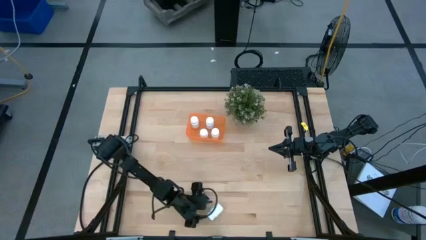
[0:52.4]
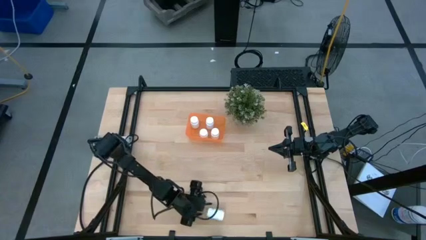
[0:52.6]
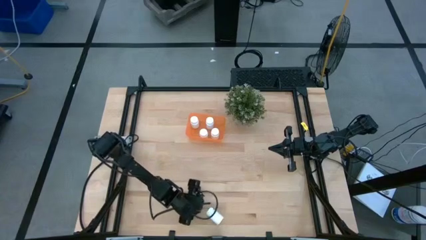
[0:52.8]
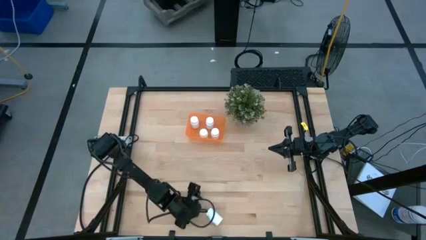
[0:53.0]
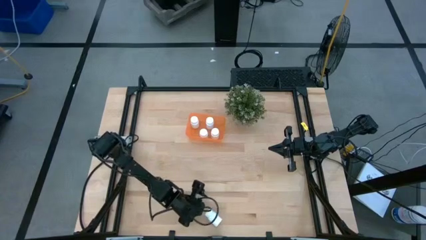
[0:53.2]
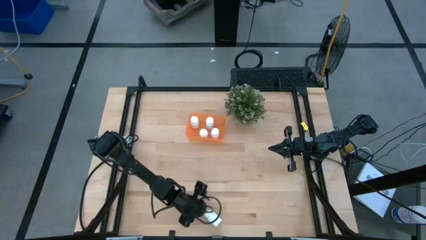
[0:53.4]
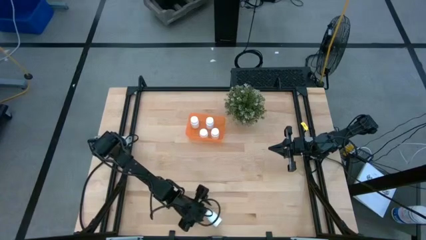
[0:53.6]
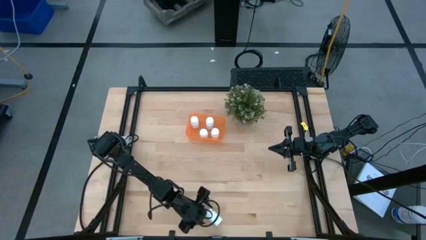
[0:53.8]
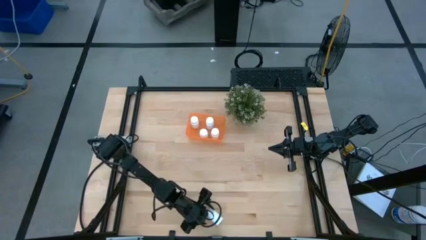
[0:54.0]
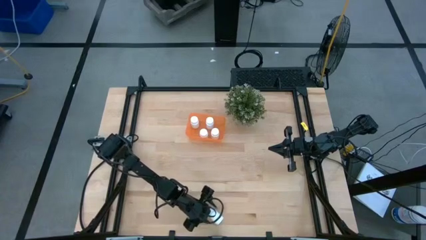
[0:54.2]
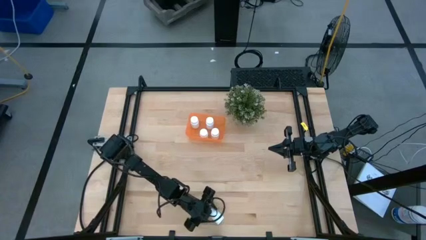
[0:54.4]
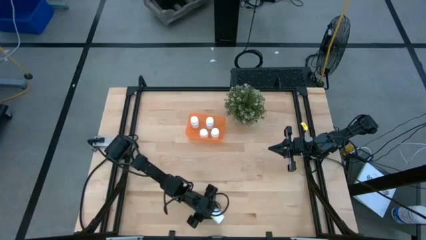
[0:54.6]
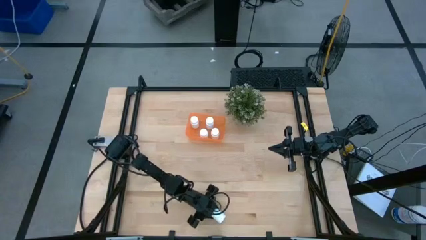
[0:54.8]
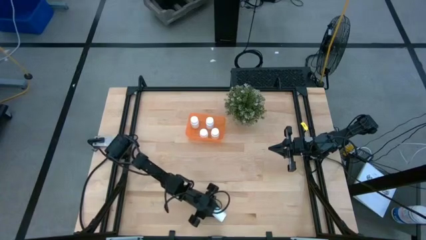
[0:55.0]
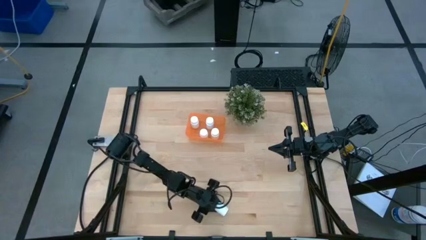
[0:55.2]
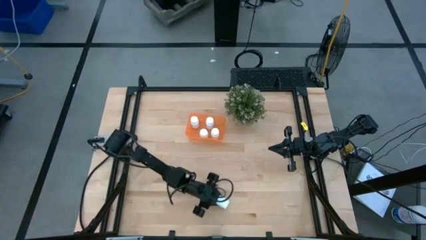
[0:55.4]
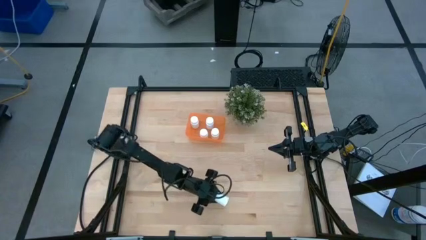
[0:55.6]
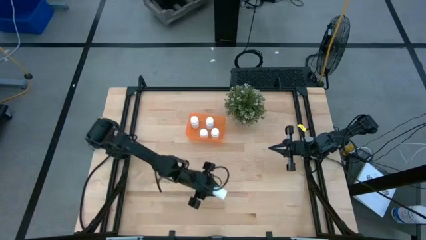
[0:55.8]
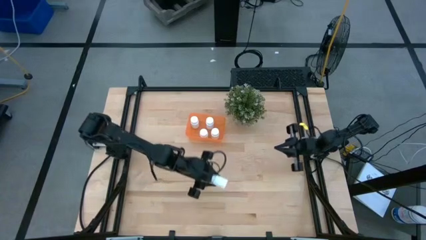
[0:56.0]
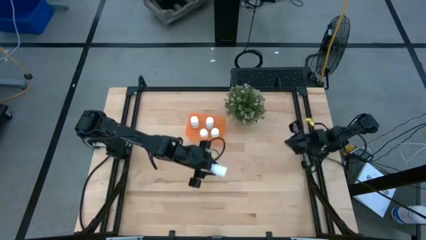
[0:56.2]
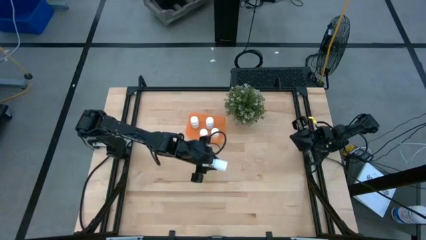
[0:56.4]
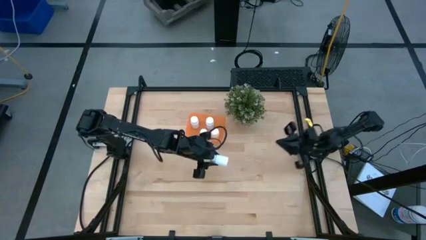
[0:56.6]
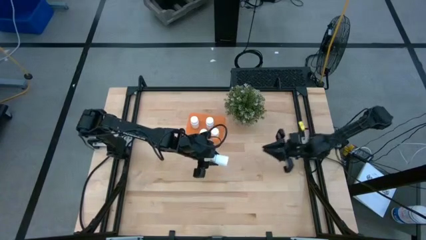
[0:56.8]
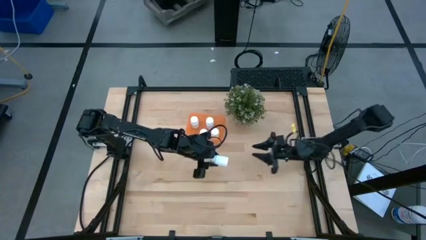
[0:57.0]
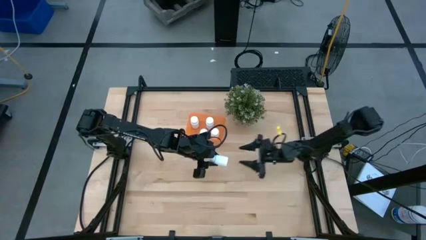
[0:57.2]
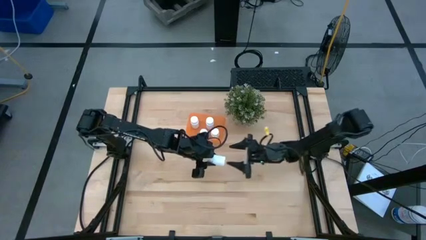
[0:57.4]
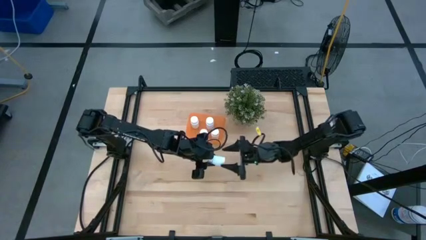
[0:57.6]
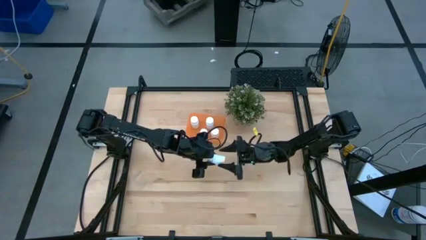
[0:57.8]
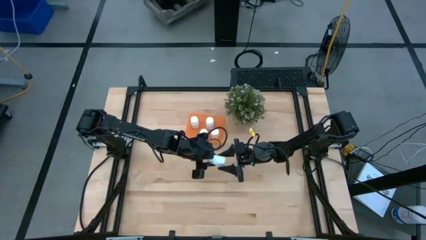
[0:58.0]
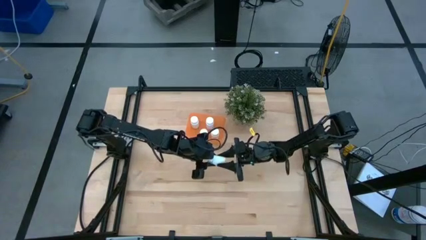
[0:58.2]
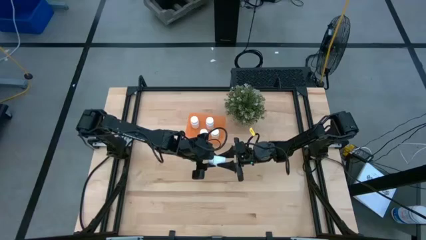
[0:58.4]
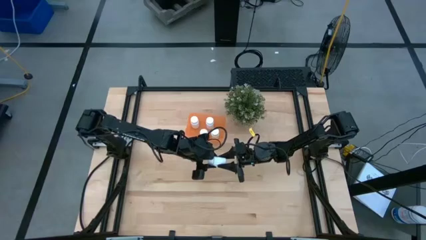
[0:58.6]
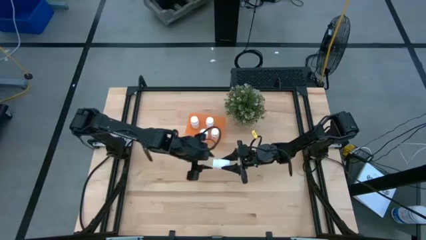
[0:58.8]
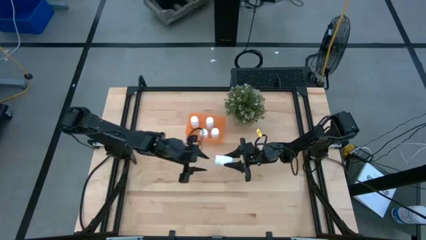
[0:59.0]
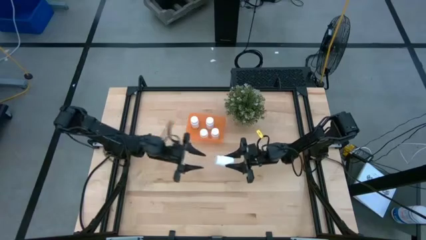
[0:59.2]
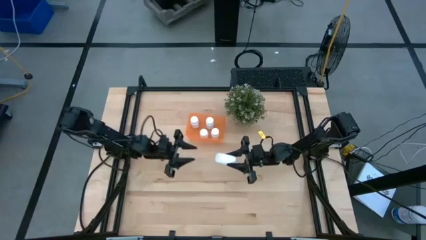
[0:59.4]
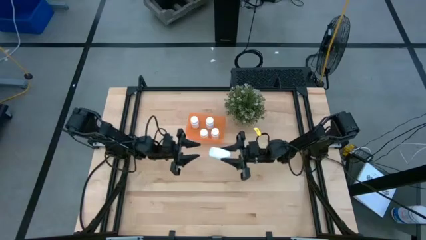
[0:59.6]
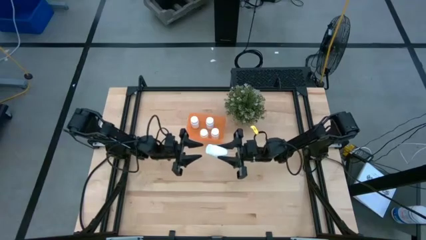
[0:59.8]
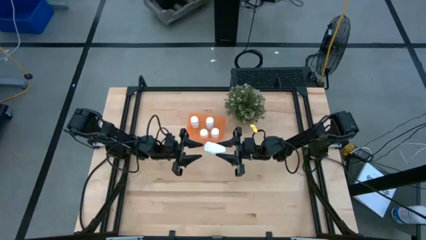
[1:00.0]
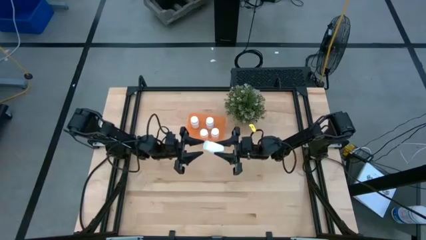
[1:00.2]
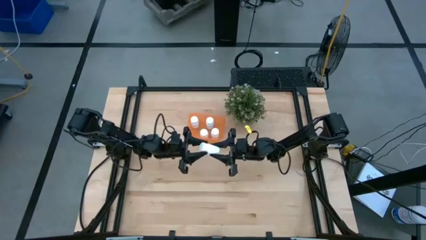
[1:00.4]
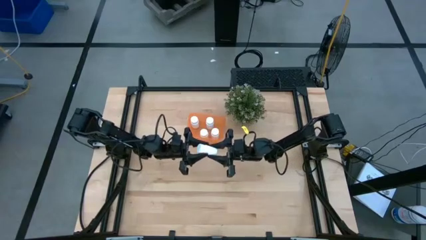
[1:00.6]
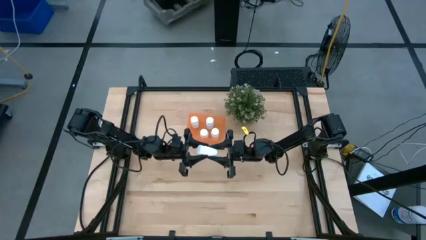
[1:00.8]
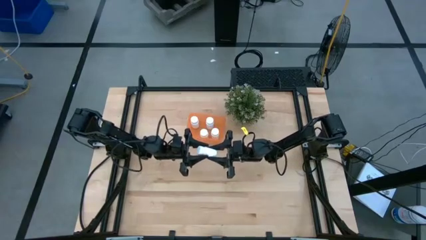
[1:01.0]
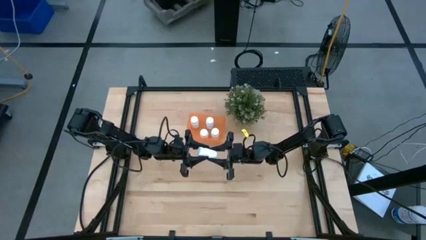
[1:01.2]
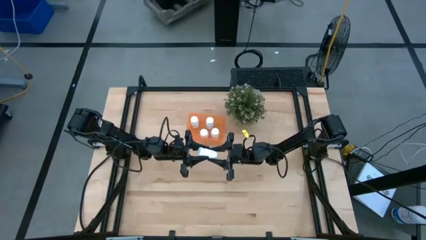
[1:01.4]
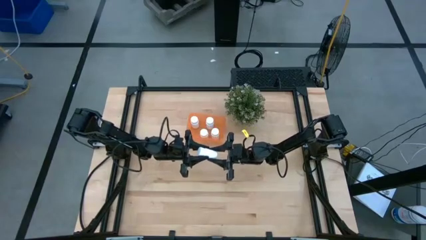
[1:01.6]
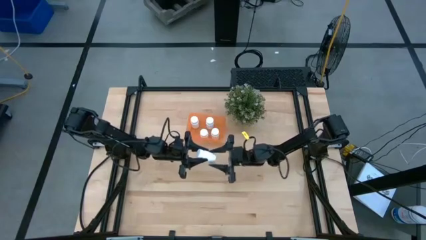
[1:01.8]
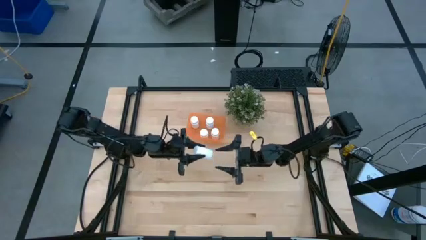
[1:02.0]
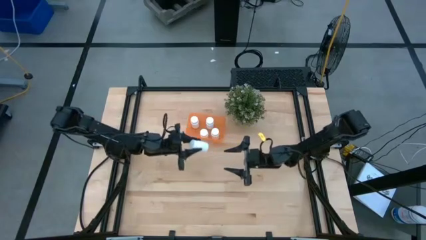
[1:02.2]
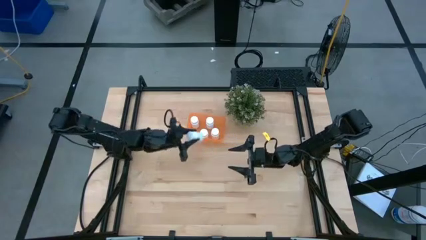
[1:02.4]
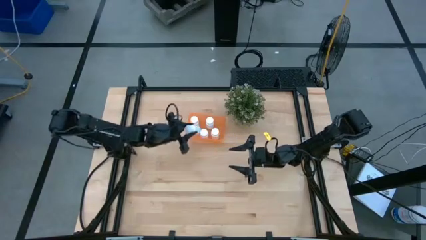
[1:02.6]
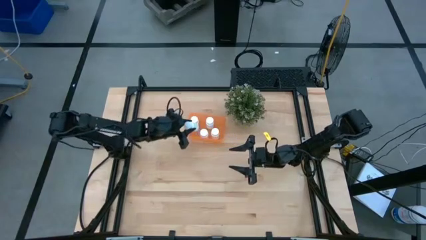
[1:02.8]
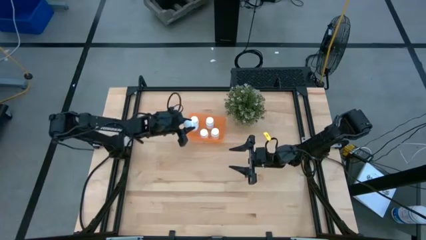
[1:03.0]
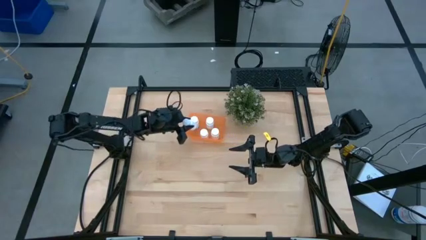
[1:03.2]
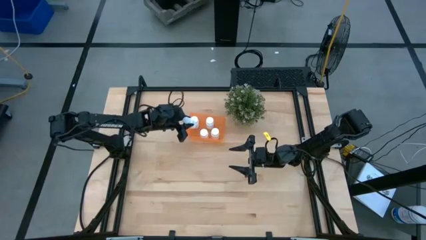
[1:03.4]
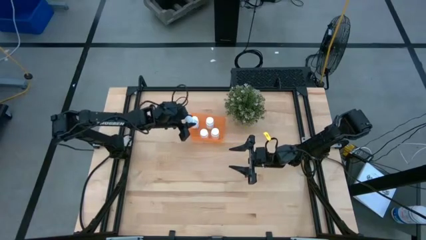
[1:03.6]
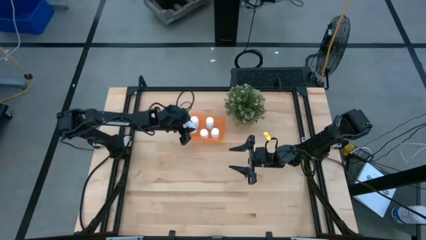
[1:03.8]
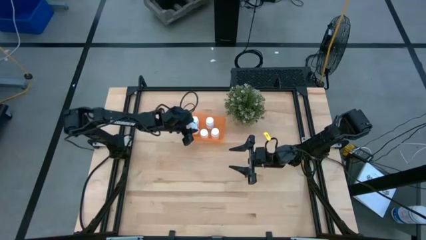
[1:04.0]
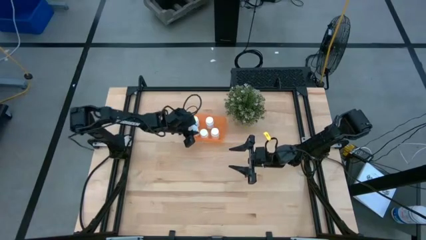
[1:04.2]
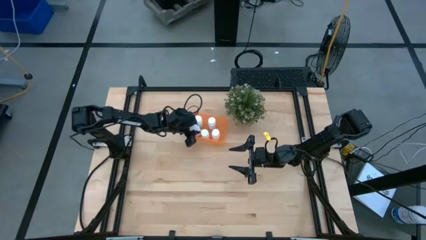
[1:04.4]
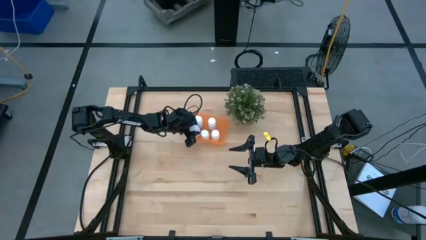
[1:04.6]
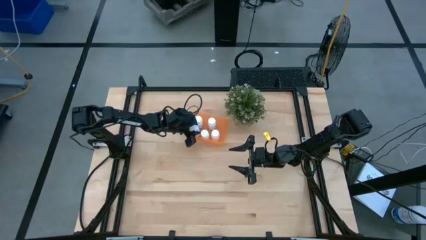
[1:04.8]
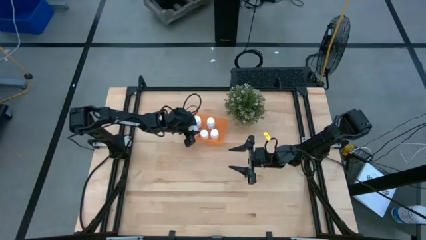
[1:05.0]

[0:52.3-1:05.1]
Task: Pick and place pill bottles into a basket
Put the white pill bottle into the orange bin
